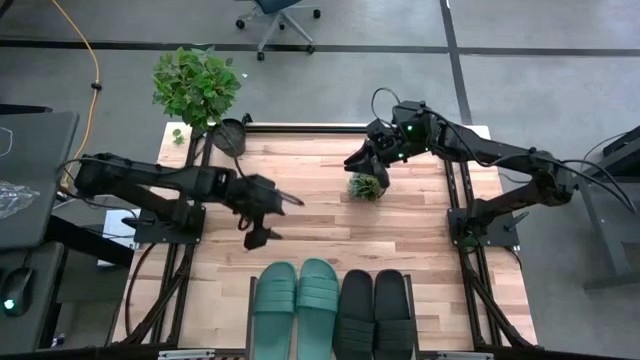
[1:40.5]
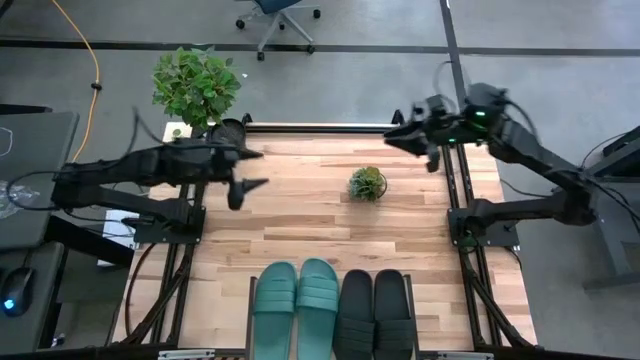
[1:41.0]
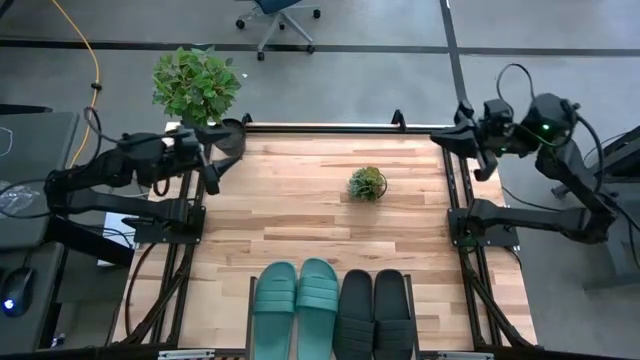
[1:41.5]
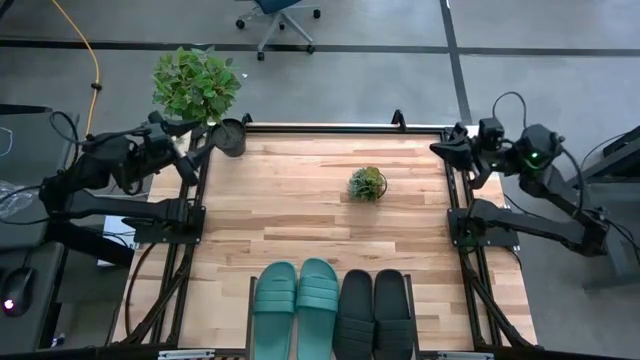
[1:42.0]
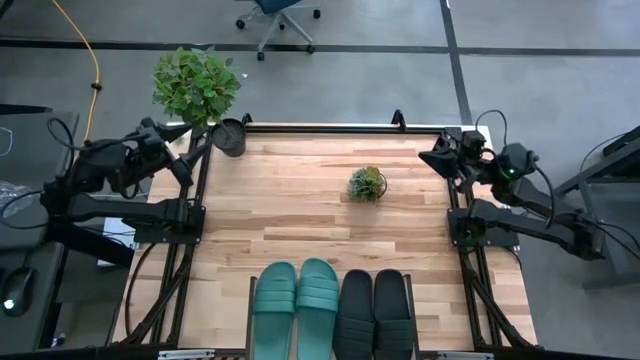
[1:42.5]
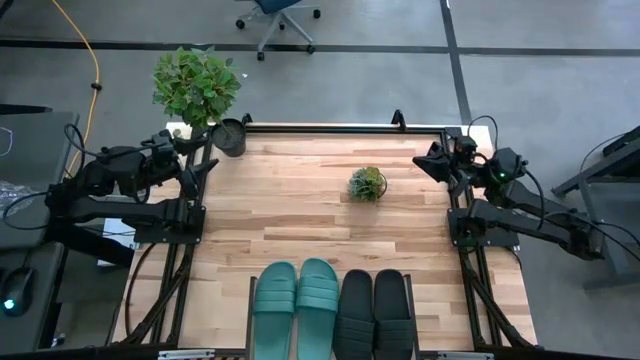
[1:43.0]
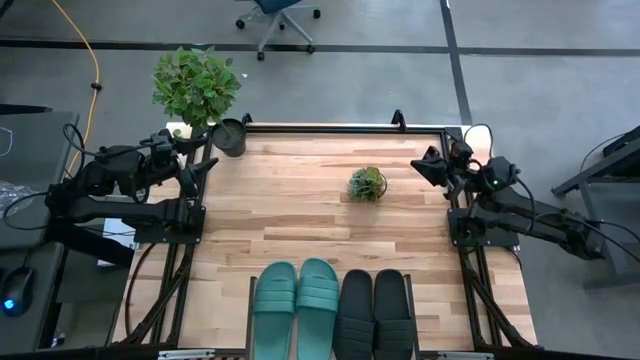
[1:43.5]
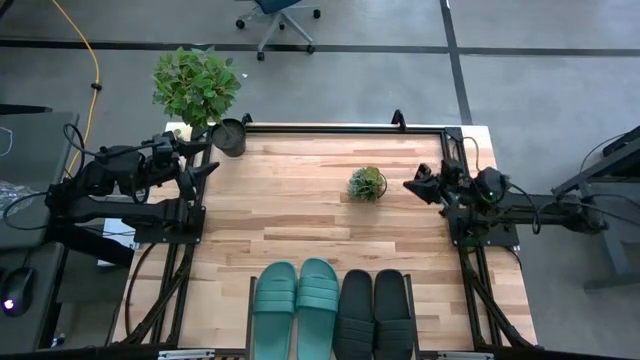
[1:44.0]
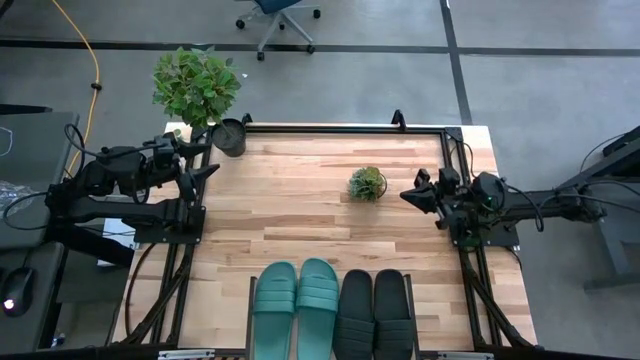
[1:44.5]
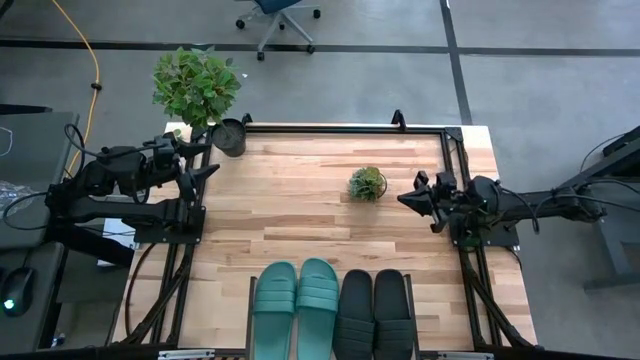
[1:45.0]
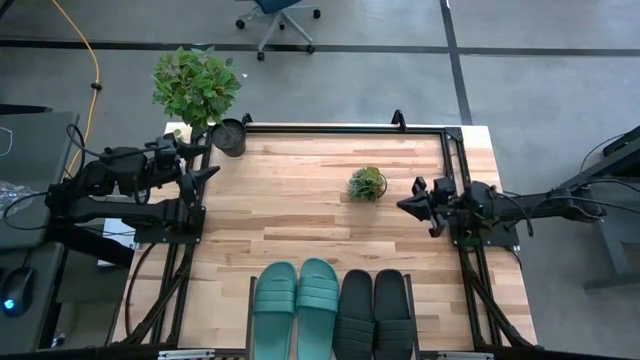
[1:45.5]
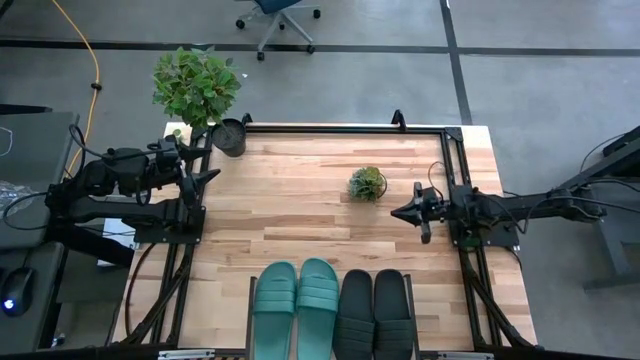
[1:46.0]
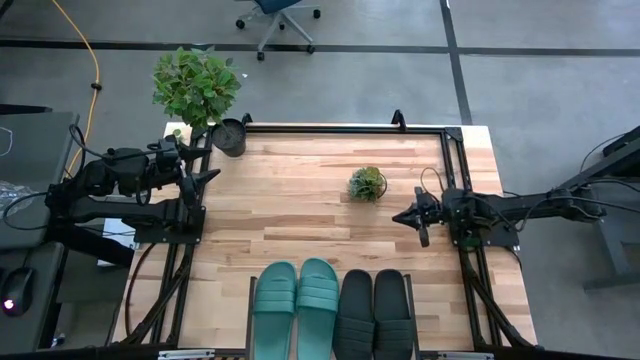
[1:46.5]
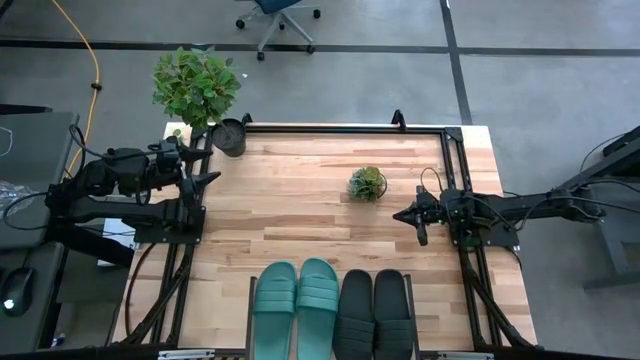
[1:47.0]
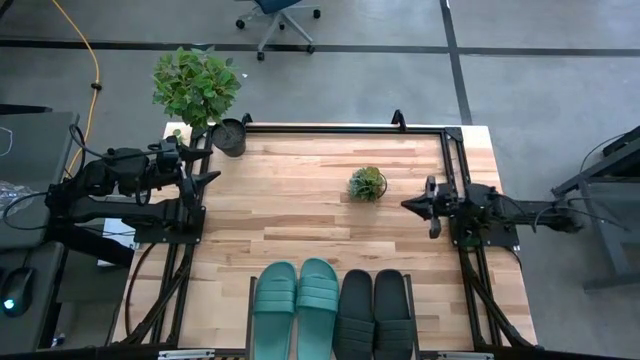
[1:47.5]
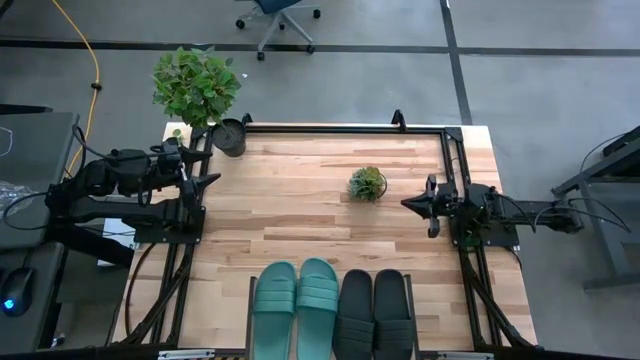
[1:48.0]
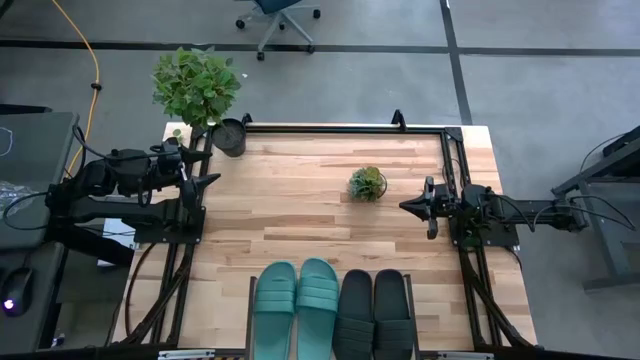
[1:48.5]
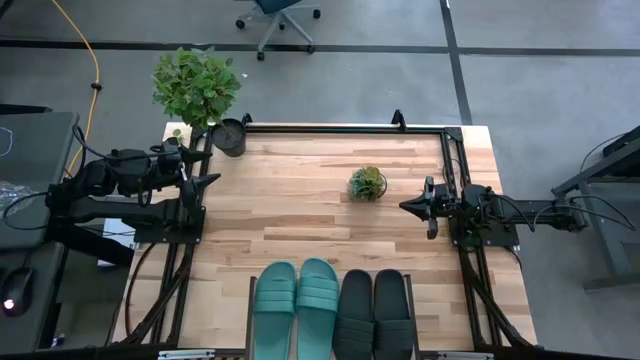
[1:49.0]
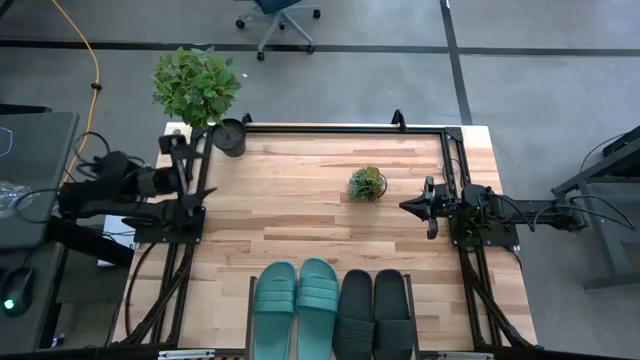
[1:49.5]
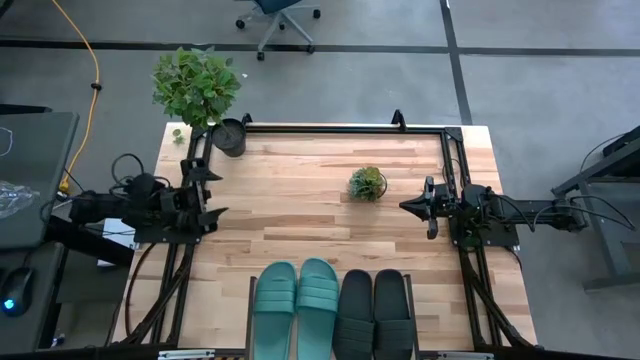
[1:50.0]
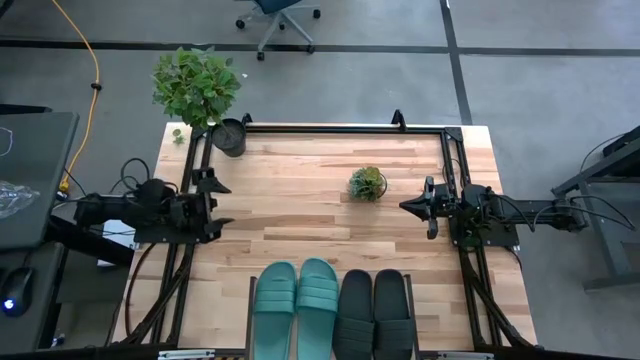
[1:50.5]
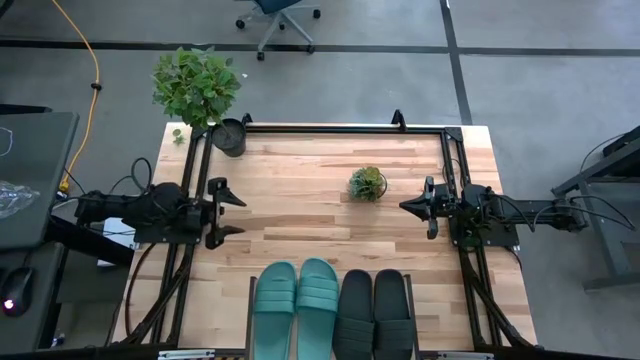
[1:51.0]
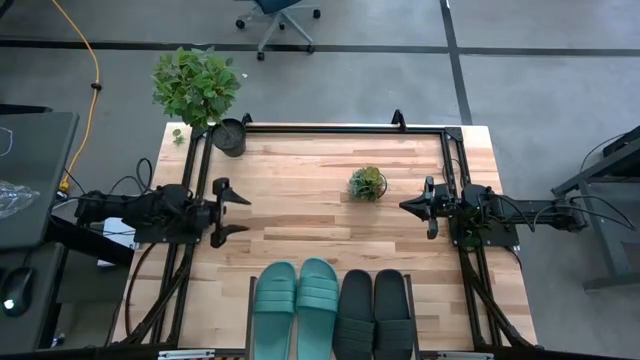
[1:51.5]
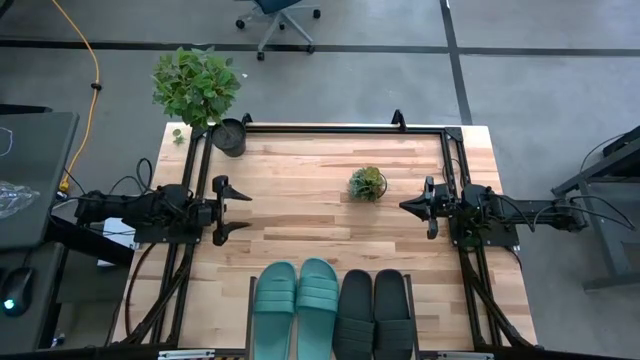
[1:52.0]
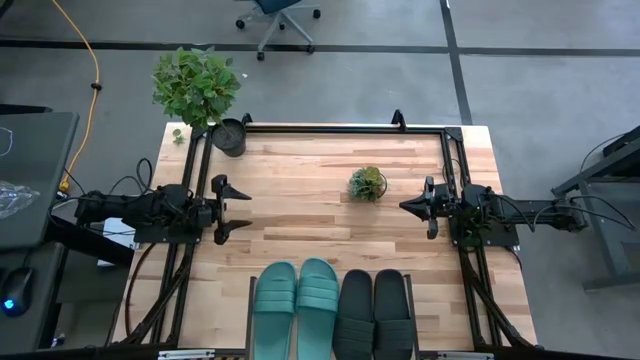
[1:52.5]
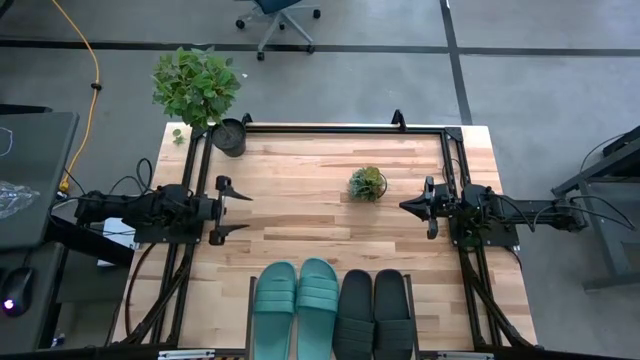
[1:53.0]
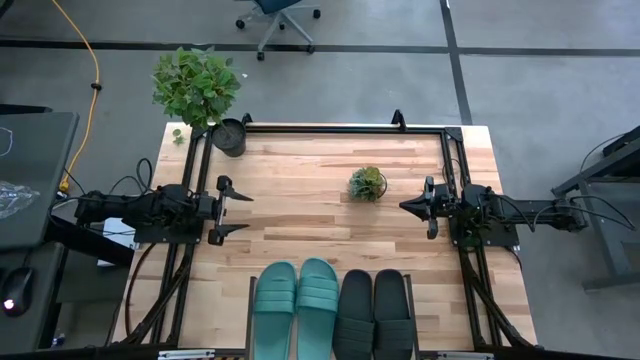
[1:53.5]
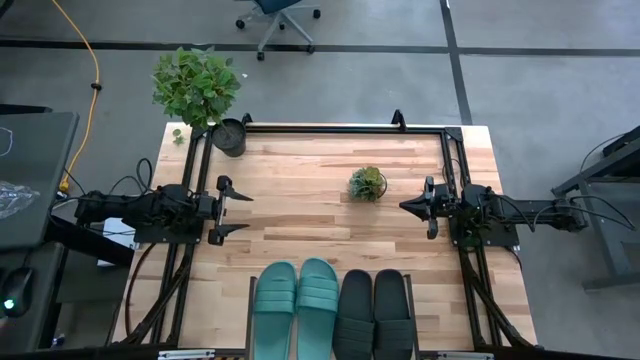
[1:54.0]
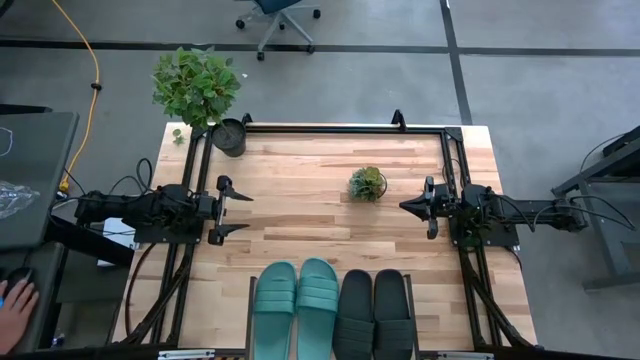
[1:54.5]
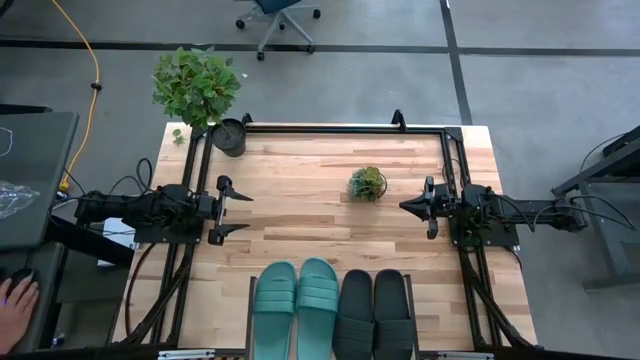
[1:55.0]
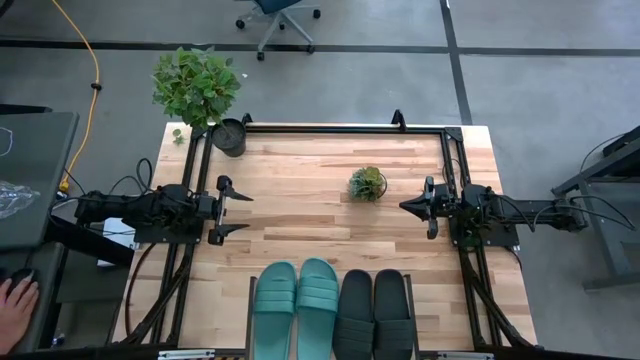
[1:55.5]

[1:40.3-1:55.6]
Task: Pick and place slides into the shelf
Return to Home Position

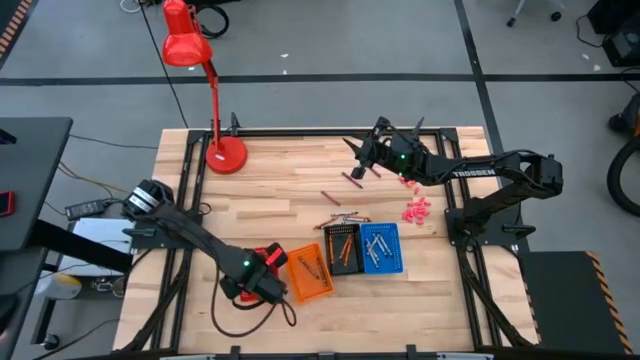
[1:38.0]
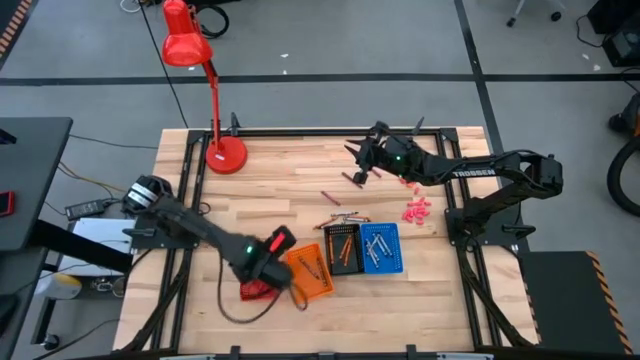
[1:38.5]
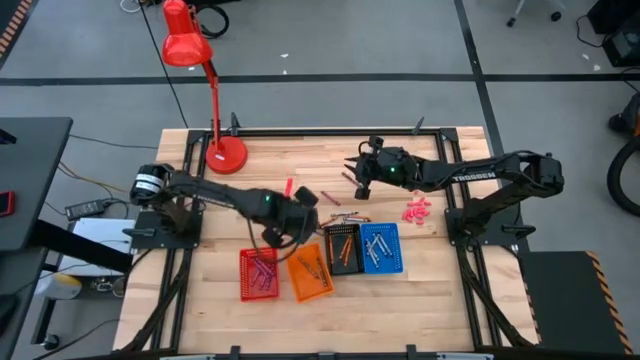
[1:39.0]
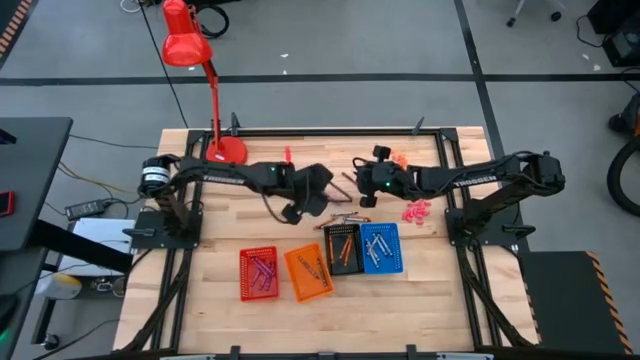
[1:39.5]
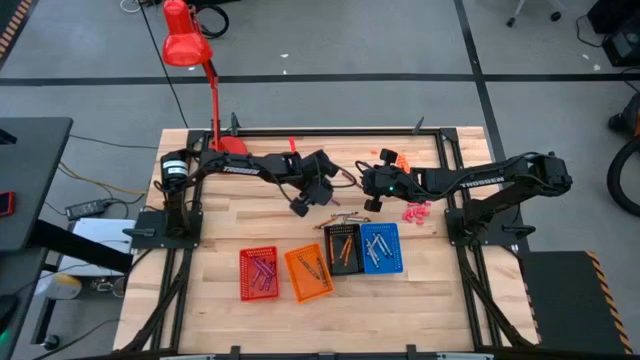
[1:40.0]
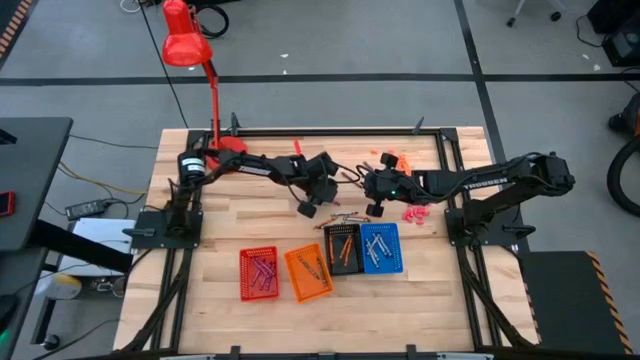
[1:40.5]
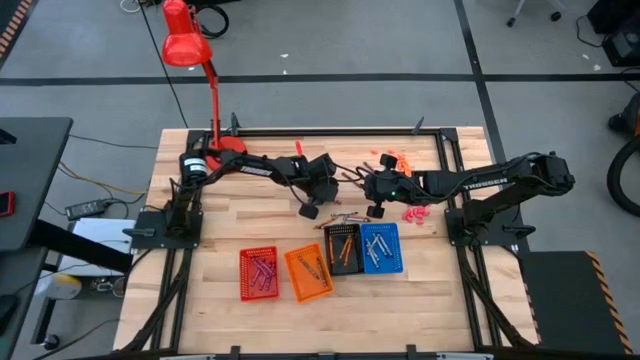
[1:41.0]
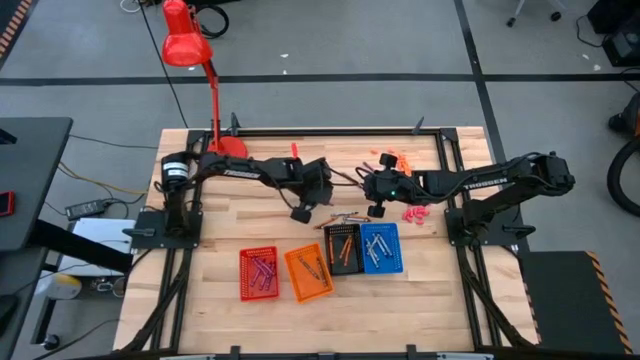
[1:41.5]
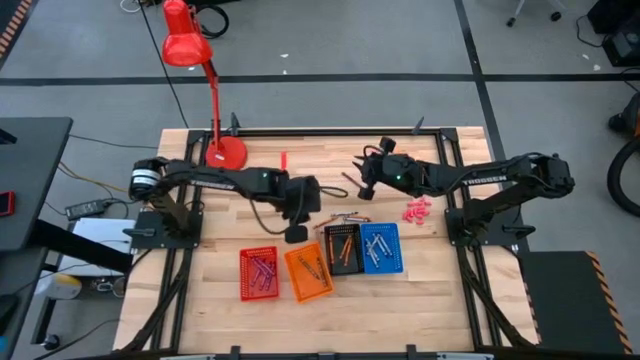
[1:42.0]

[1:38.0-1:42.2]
Task: Sort crayons
Put the pink crayon into the red bin
